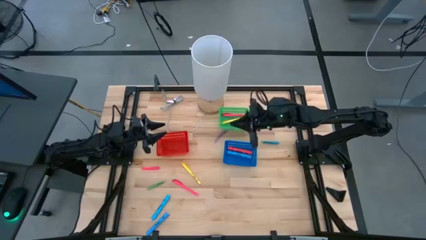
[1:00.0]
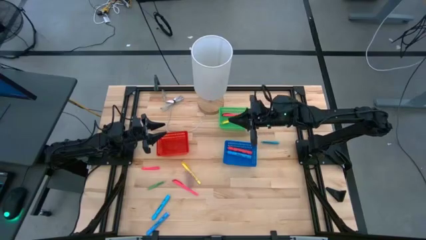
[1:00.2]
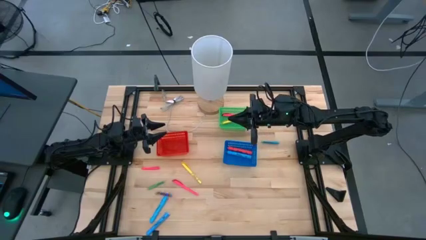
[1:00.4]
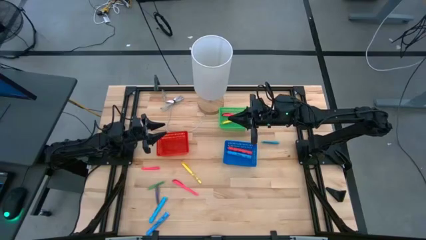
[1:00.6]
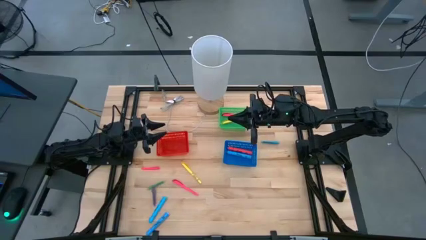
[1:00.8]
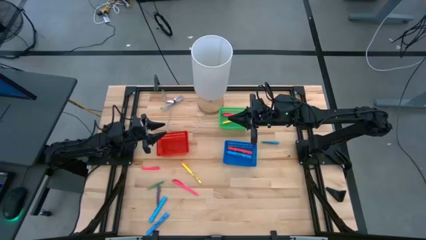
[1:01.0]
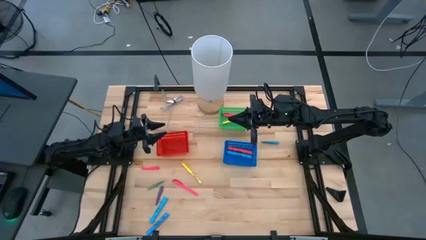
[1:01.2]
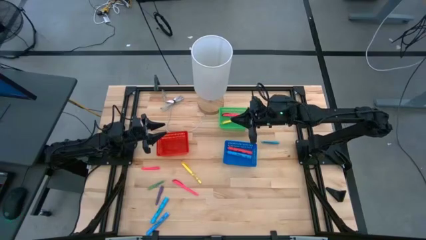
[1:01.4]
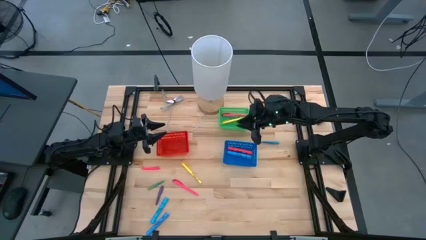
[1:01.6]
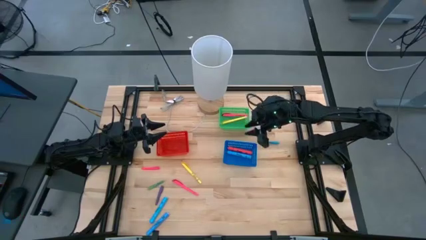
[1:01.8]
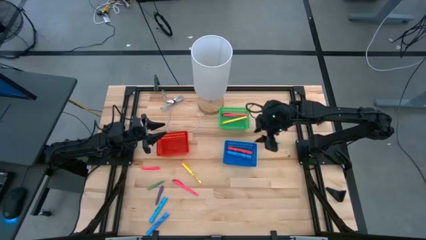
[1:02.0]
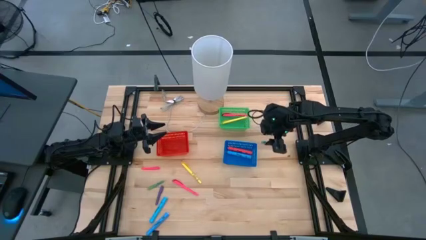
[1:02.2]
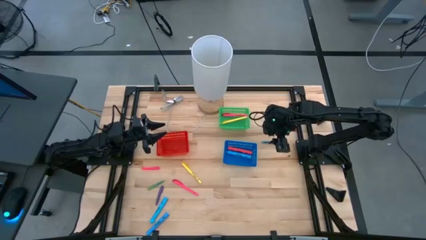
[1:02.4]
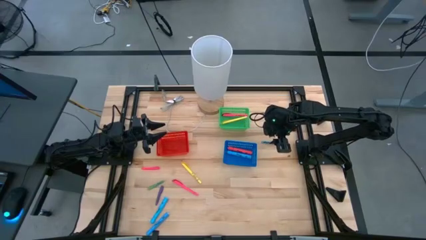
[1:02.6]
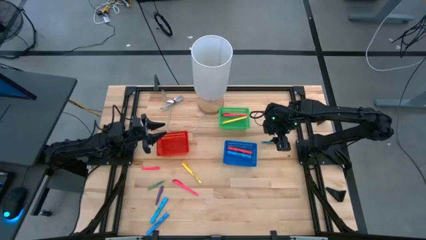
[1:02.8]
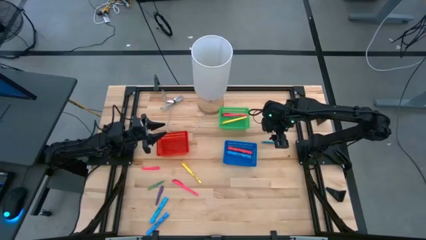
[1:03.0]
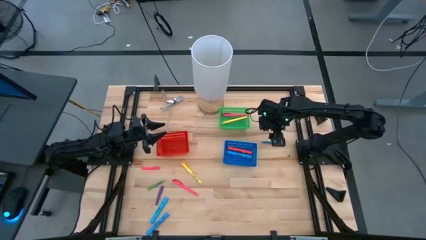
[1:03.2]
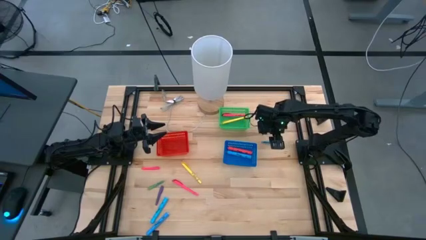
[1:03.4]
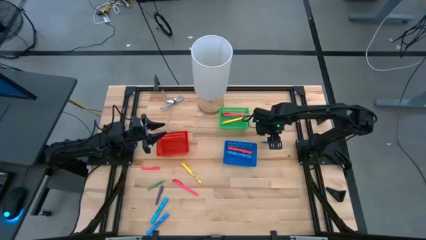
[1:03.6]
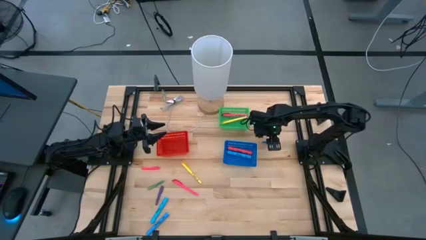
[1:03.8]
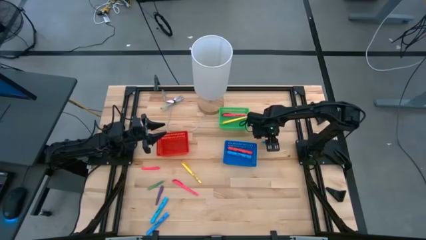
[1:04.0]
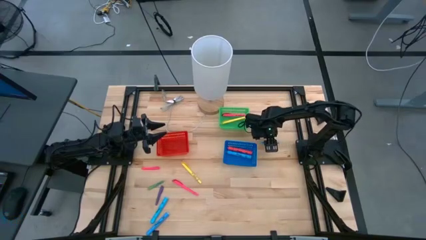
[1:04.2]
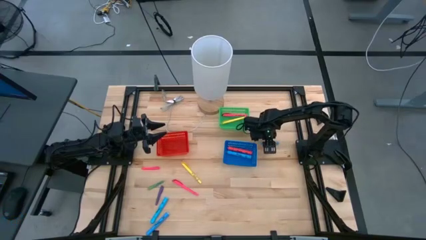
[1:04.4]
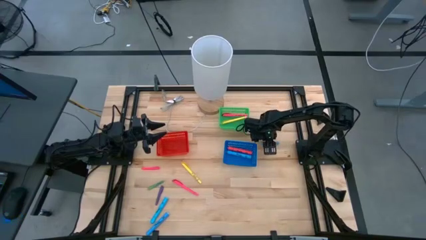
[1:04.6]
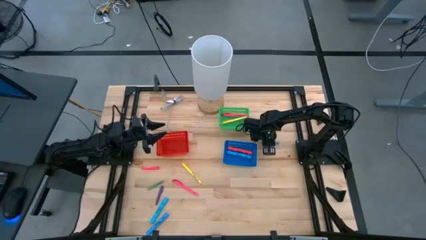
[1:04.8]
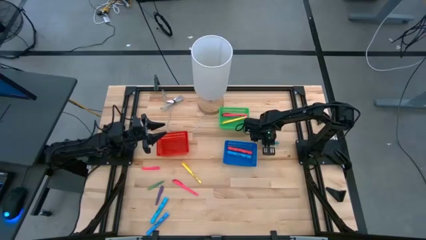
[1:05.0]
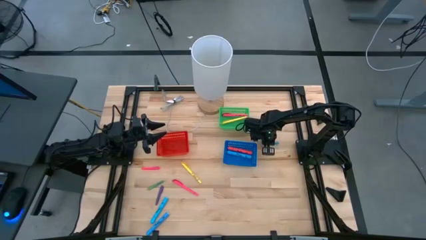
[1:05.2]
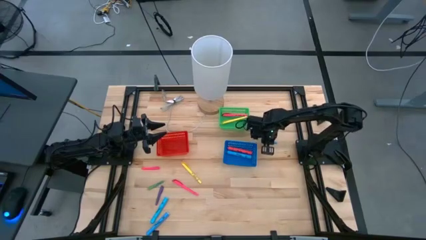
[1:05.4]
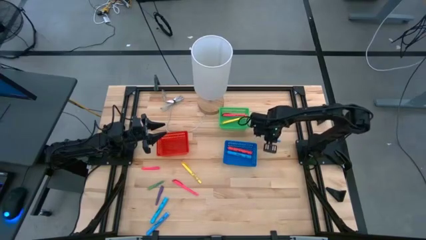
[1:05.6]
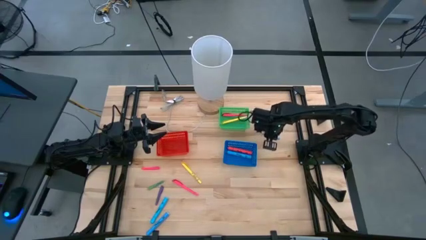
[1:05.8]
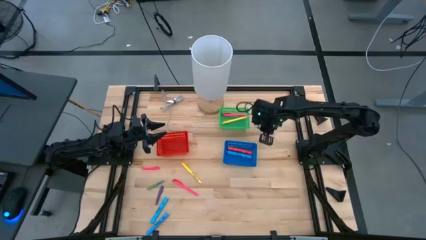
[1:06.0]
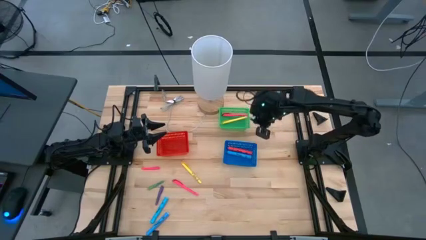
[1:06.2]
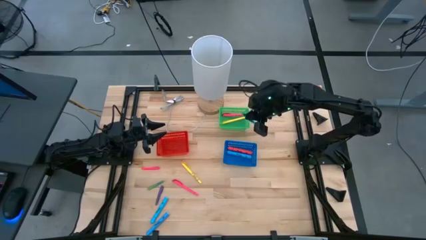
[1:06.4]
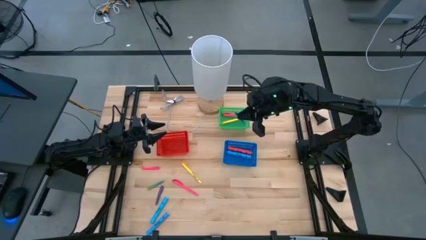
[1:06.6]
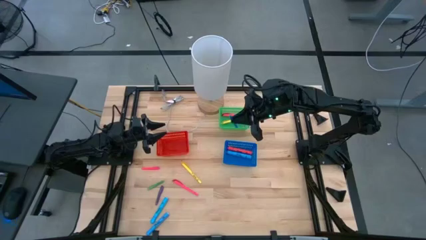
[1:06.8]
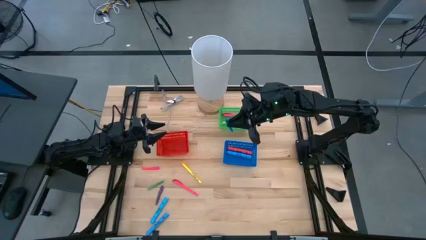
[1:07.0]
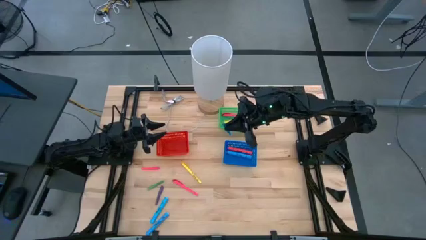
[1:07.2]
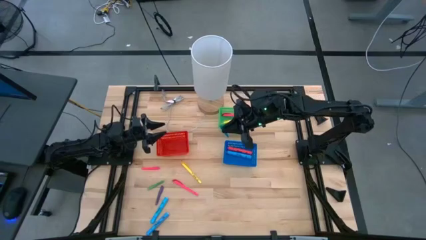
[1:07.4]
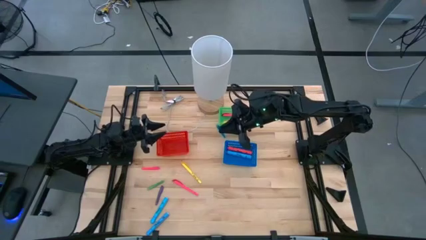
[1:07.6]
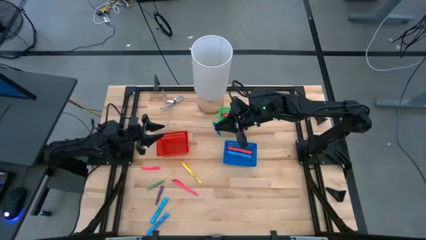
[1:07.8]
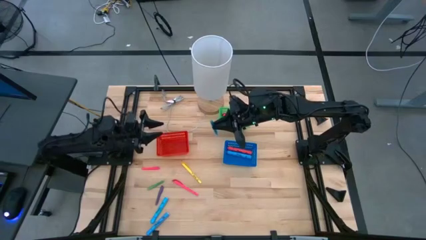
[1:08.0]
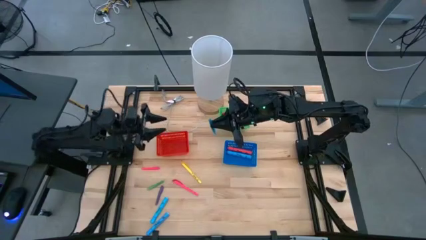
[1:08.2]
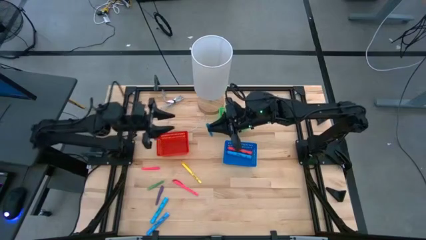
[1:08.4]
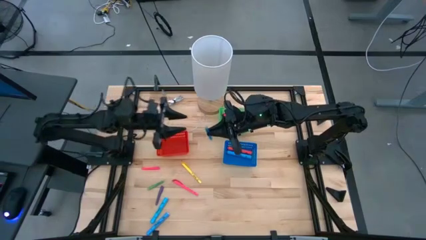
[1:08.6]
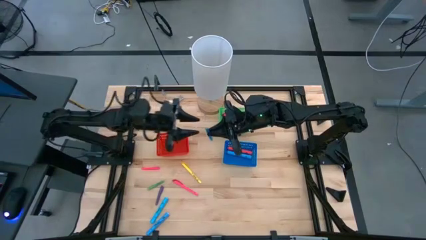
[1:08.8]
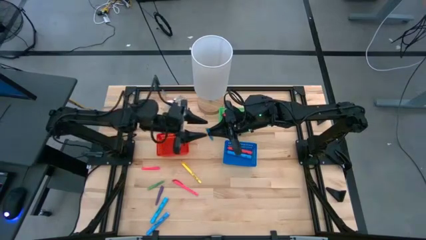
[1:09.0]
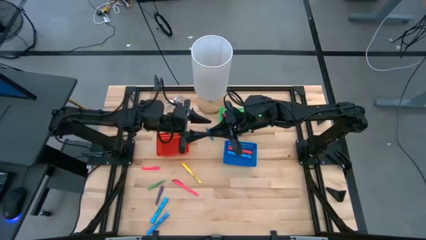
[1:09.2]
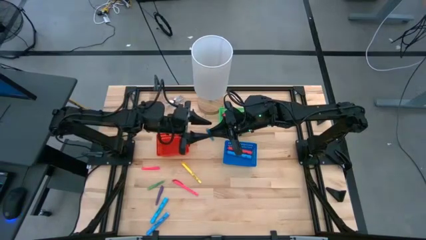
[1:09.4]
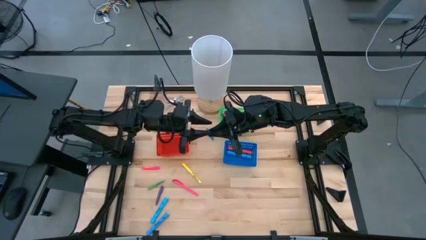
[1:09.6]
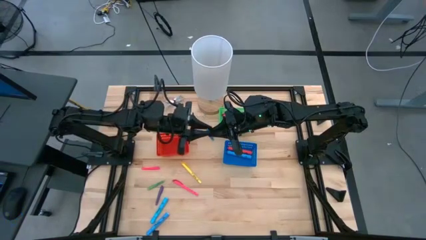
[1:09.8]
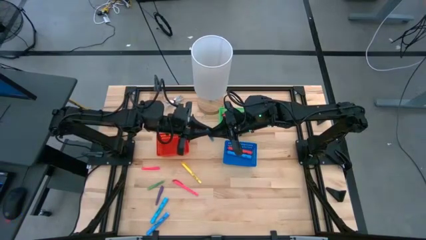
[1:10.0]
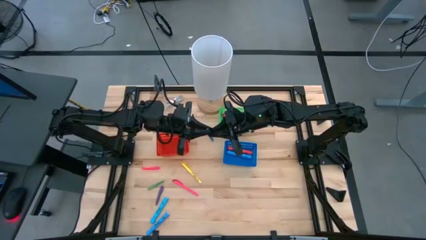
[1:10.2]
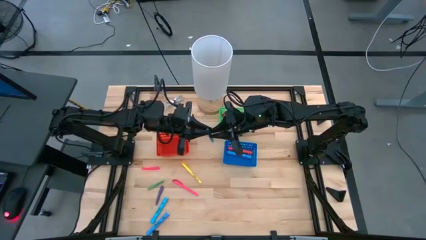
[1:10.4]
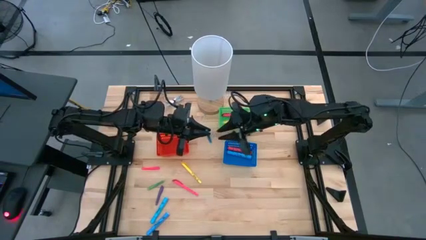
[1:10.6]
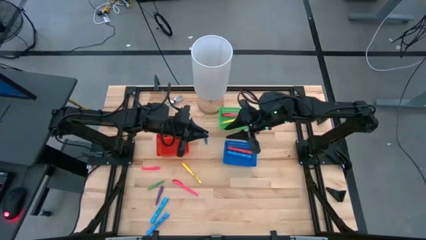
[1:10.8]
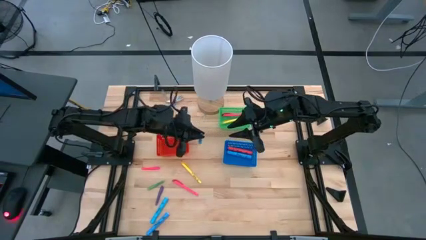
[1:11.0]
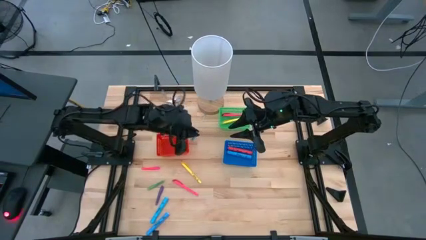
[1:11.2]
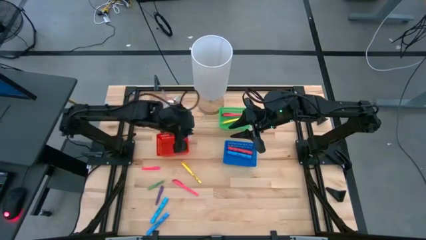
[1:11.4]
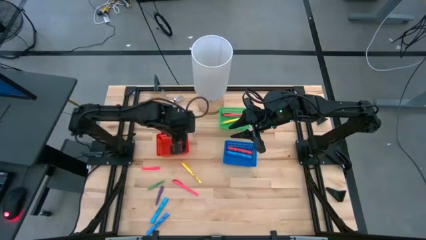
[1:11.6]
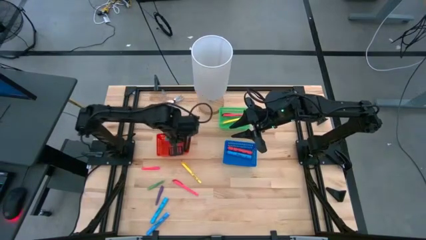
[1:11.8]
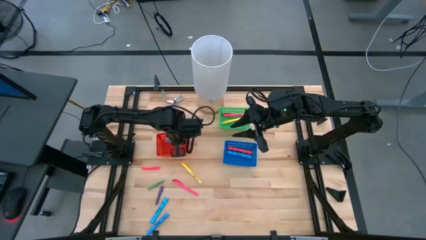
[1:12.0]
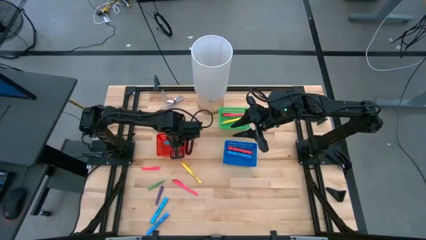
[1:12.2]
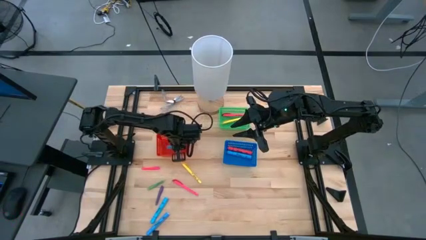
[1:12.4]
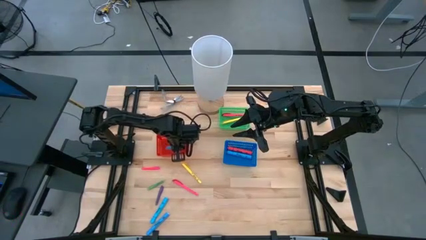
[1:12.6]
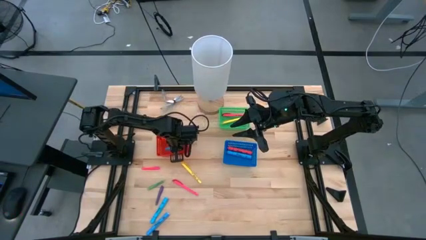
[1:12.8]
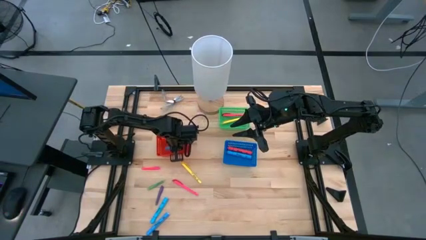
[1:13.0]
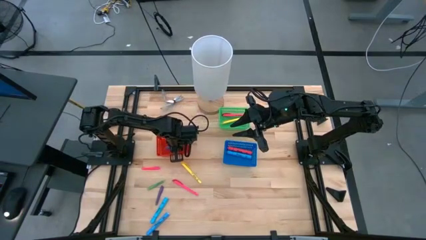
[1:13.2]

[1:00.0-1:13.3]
Task: Pick & Place Markers
Put the small blue pen into the red bin
